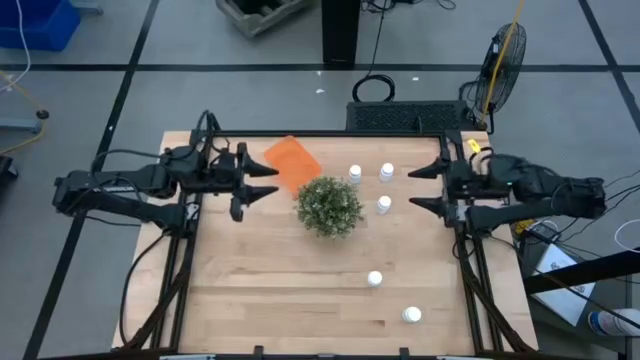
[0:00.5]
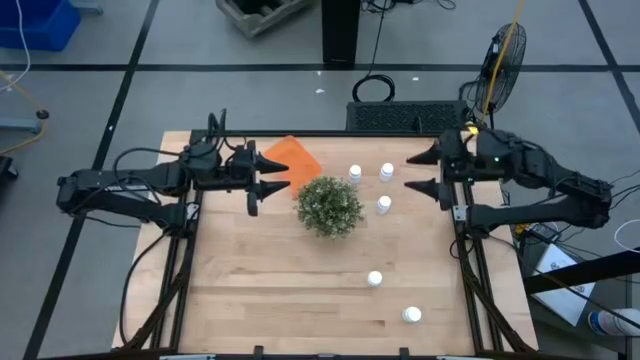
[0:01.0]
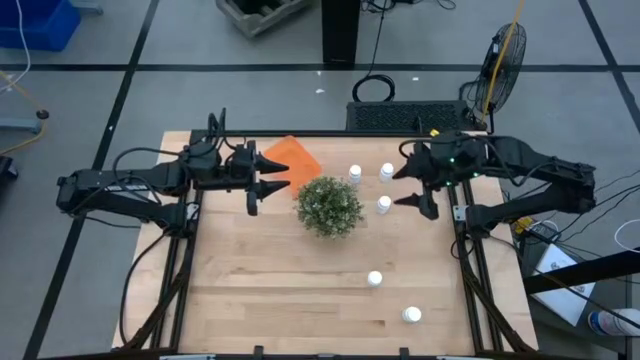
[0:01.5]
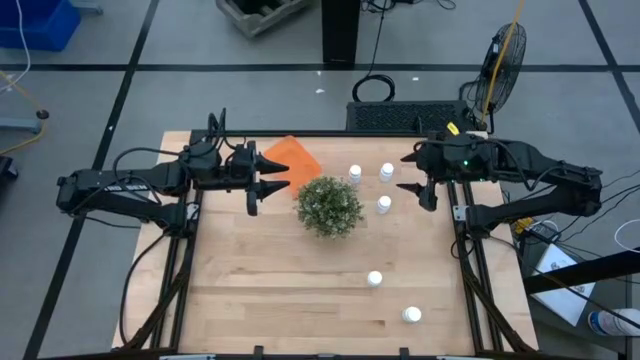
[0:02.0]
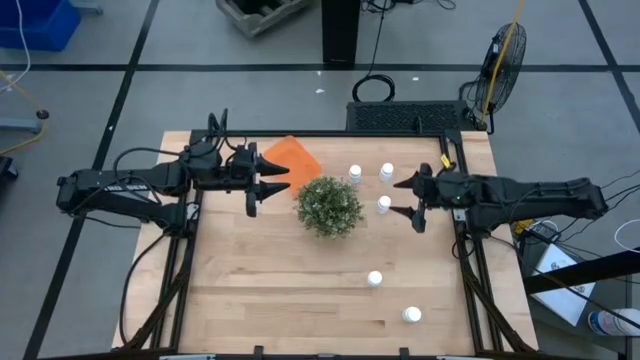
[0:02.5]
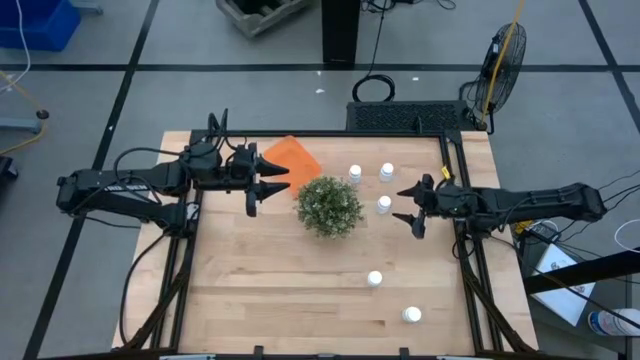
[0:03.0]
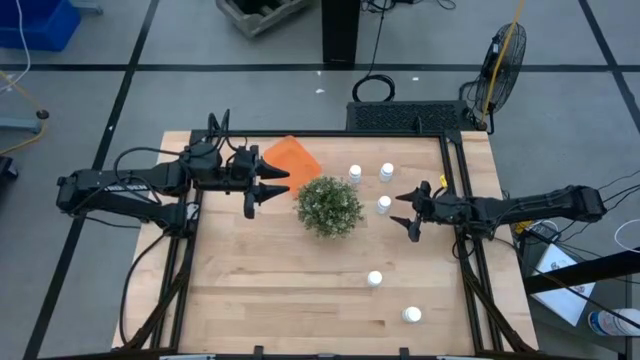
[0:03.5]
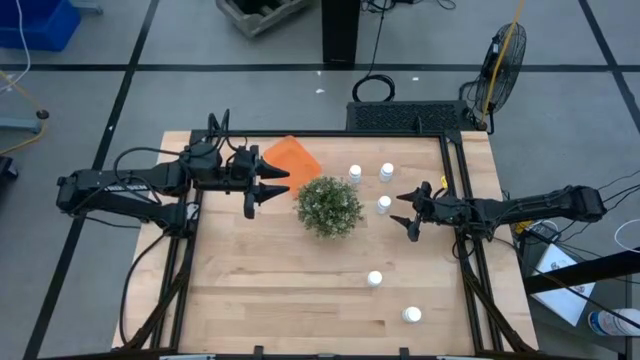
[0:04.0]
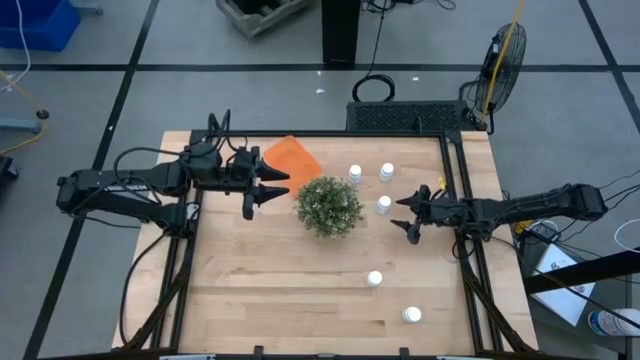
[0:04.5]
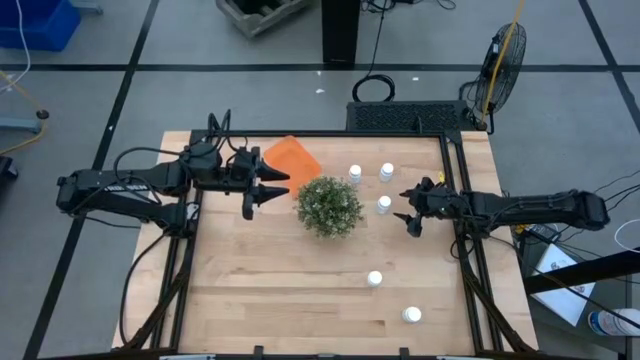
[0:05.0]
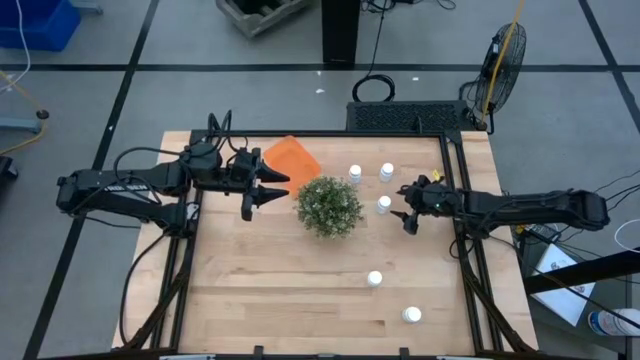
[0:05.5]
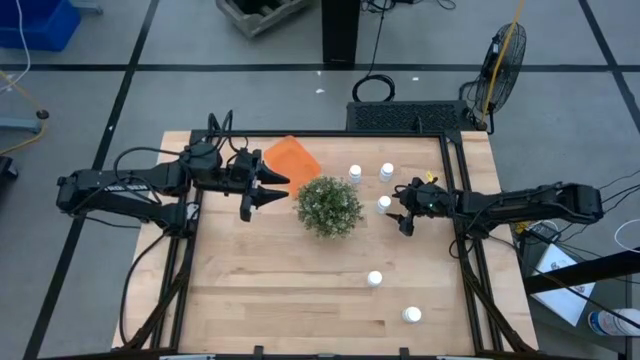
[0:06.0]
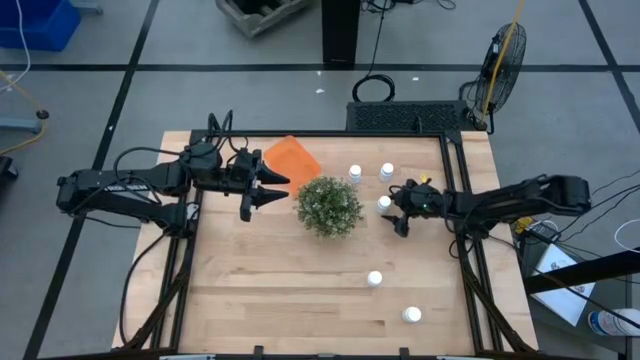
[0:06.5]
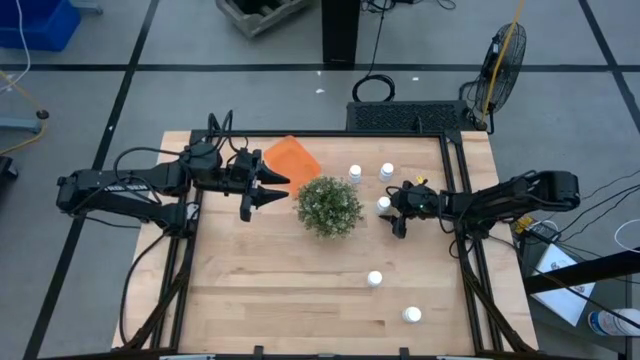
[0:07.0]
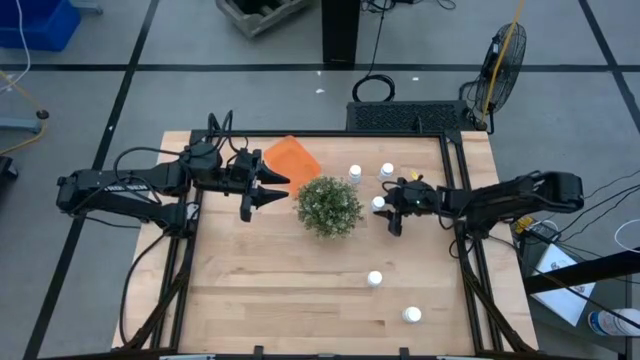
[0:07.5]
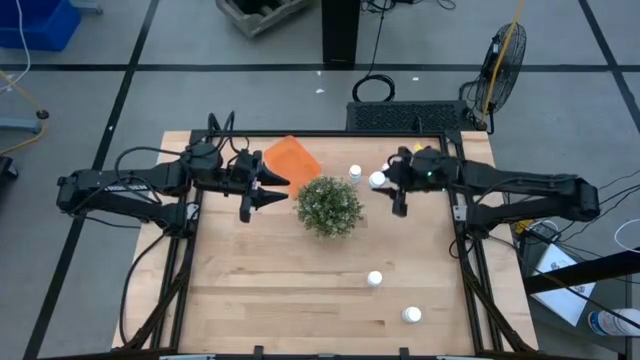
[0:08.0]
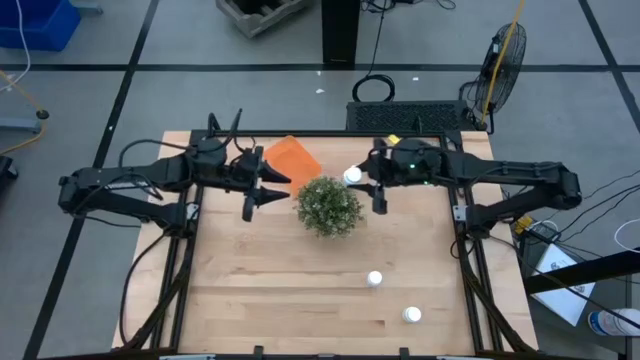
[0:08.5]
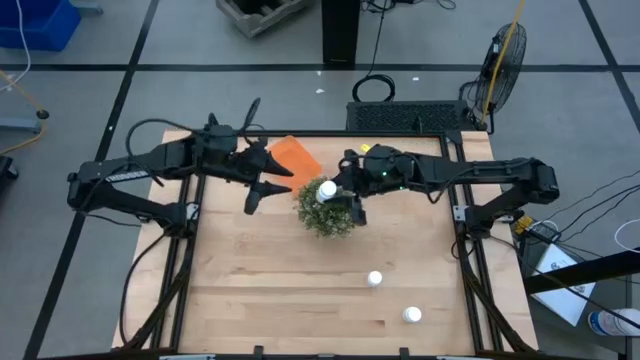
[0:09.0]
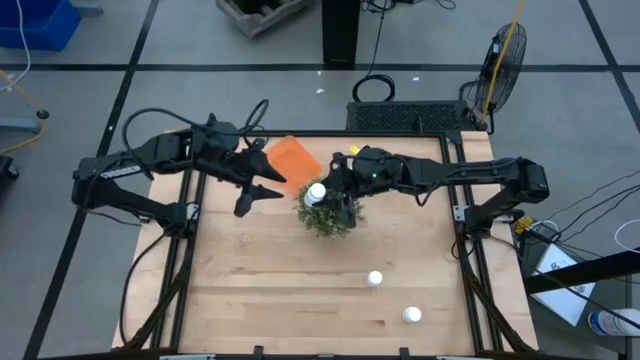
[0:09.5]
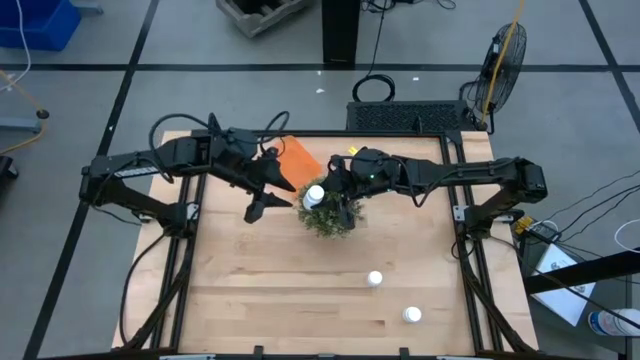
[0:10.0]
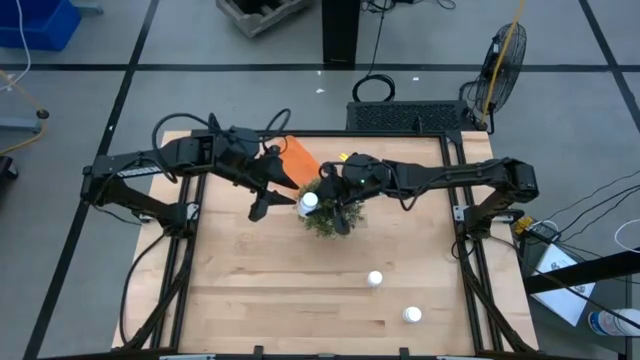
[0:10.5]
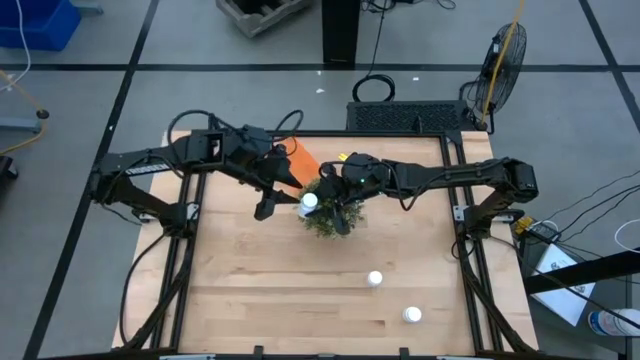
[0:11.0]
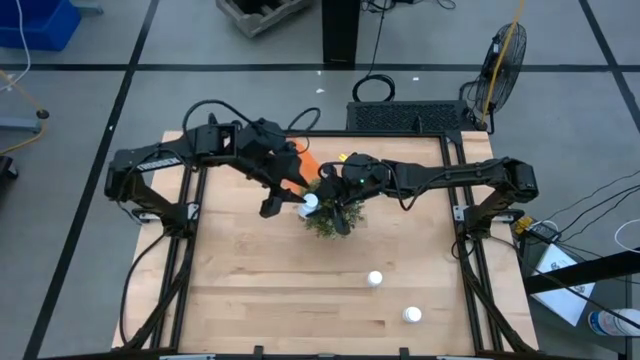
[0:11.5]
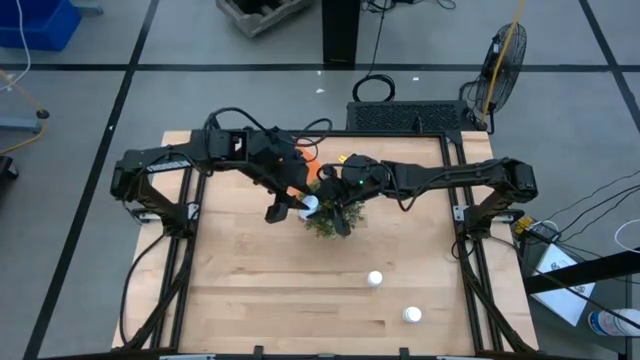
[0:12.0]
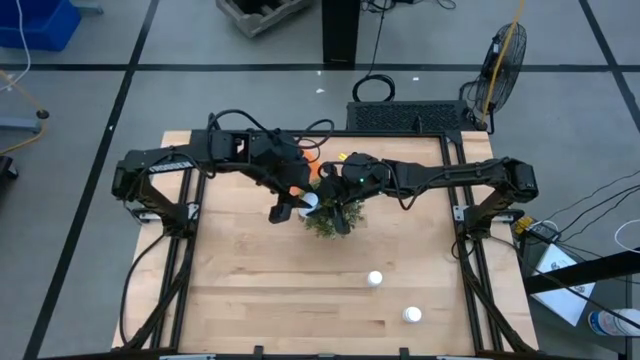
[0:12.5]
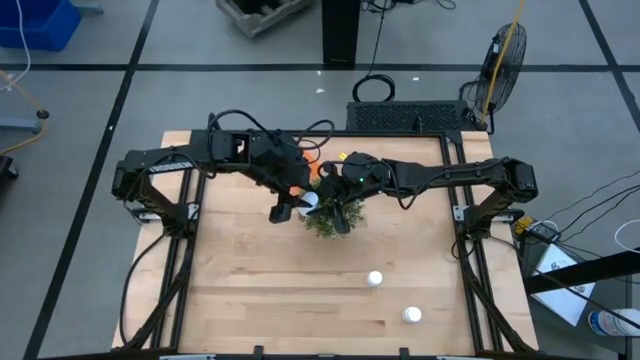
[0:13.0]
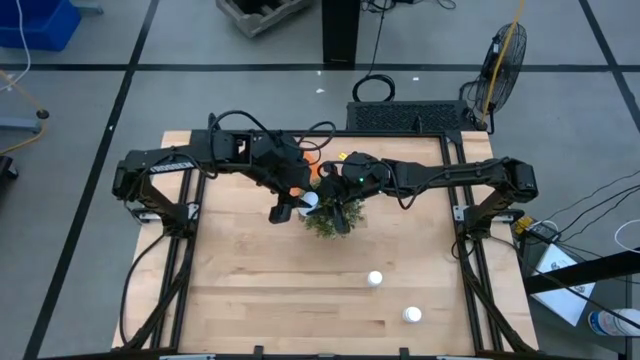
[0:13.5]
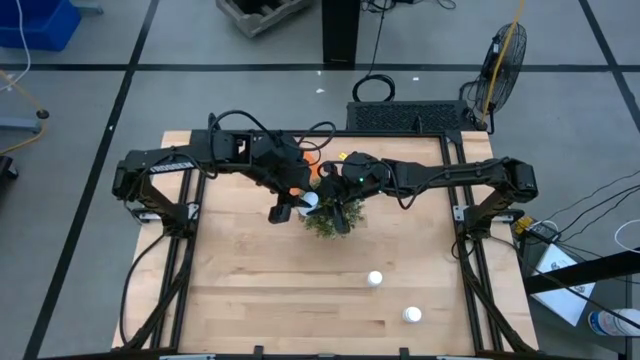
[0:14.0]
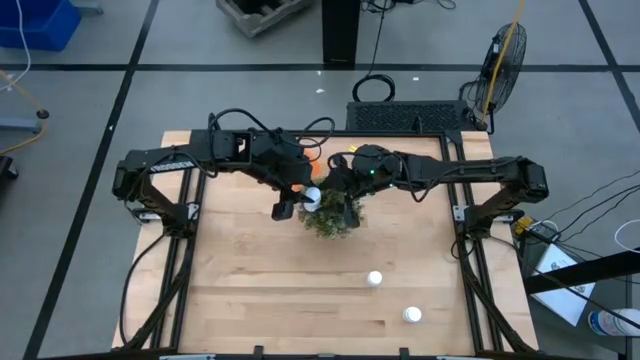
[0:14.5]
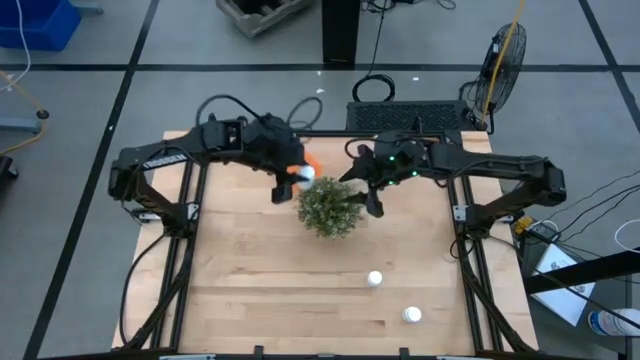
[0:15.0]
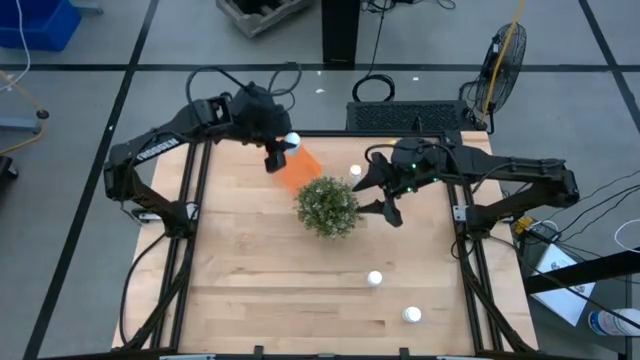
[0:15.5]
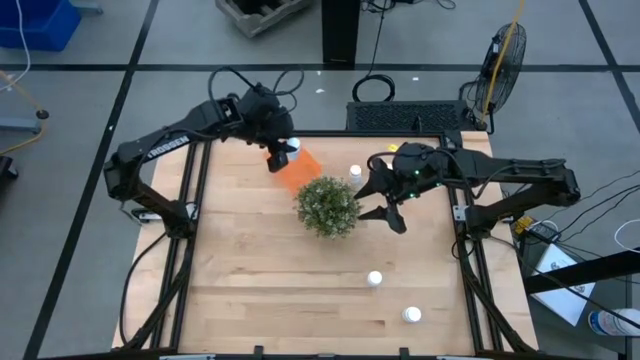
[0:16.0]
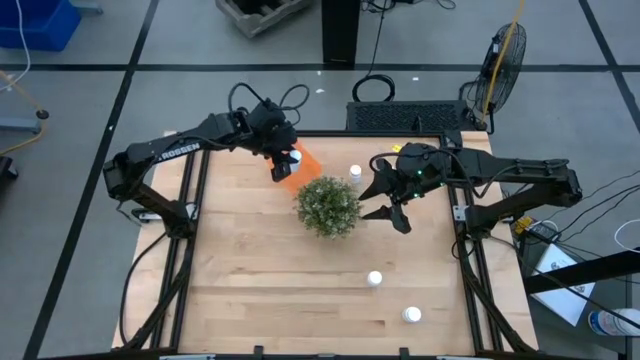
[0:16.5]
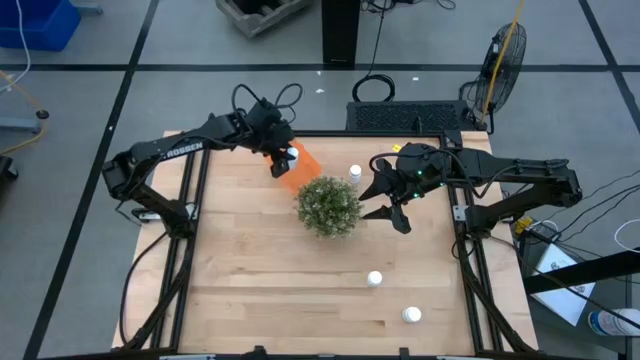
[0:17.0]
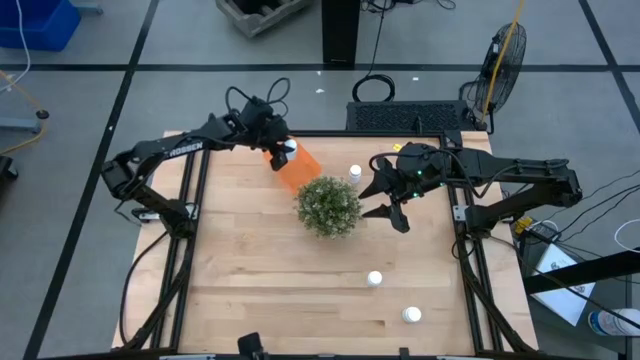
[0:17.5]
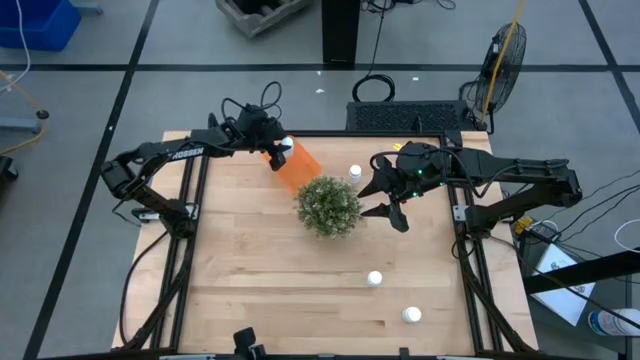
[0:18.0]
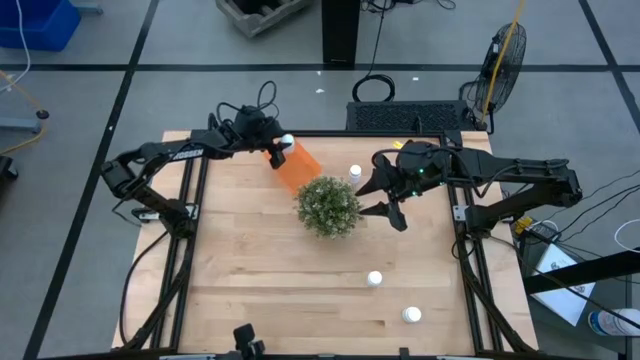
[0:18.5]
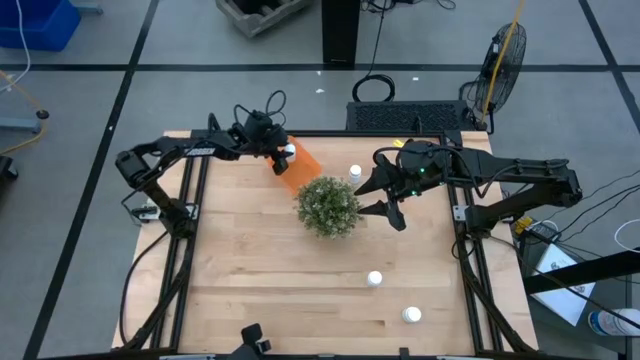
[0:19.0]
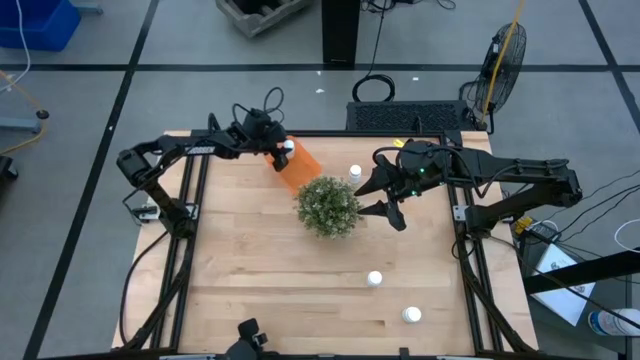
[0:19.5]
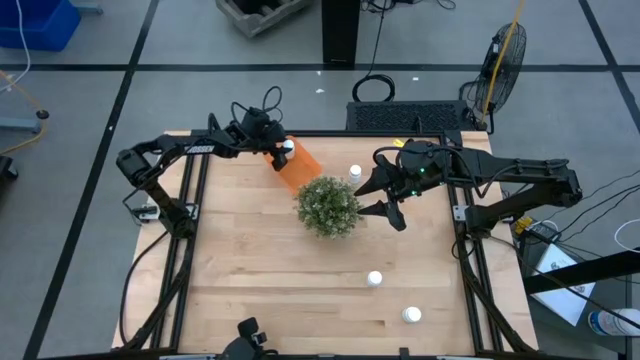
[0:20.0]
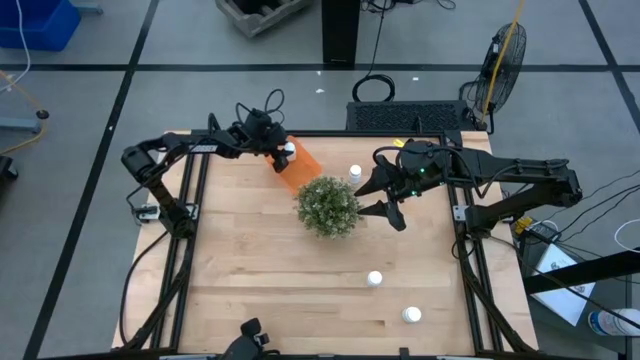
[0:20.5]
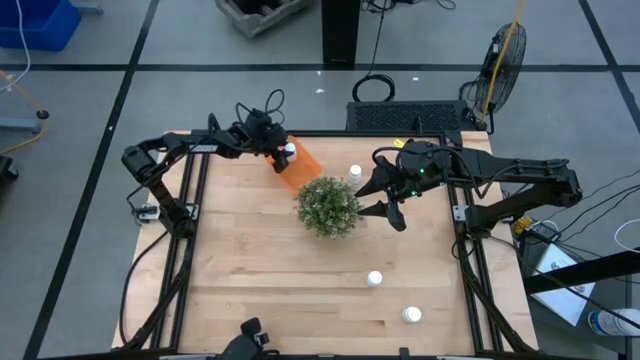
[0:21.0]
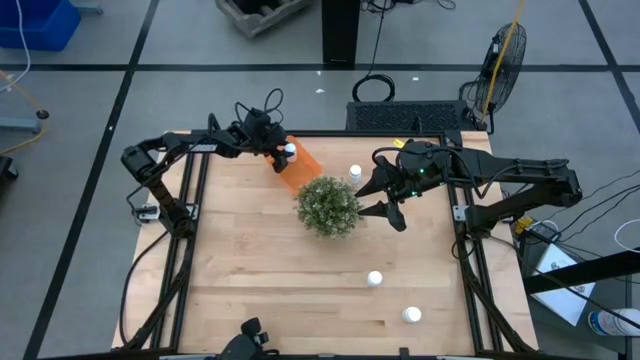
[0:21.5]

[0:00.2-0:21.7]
Task: Pick and place pill bottles into a basket
Put the white medicine bottle into the orange bin
